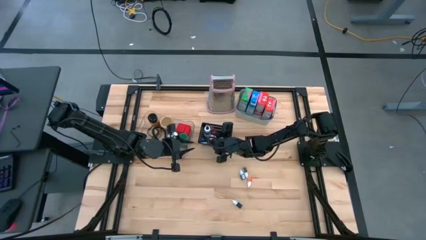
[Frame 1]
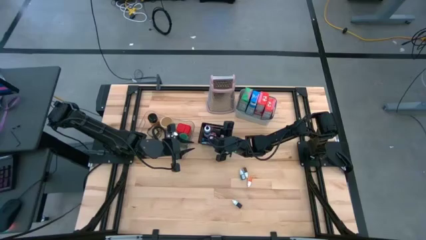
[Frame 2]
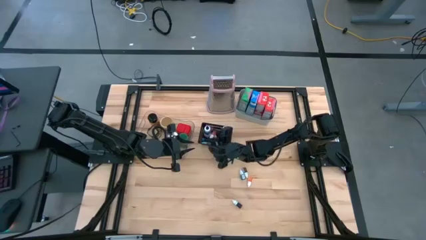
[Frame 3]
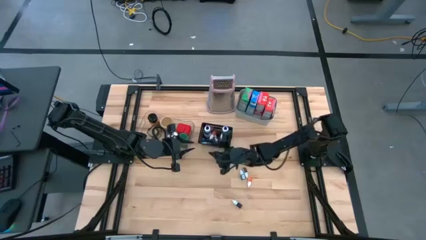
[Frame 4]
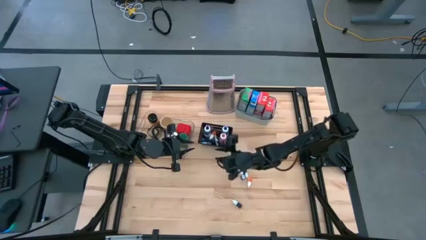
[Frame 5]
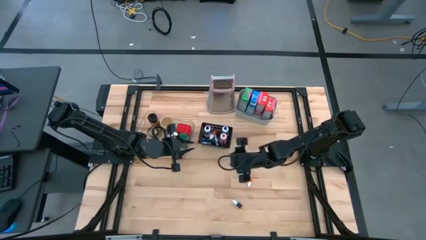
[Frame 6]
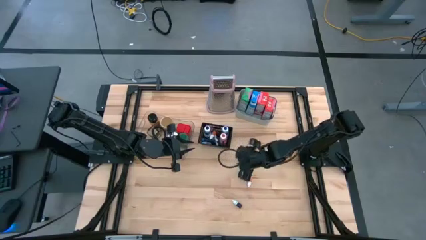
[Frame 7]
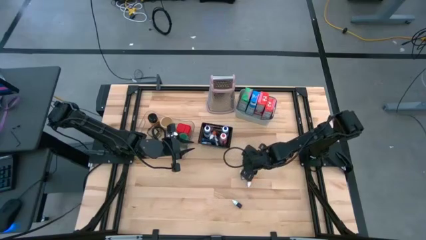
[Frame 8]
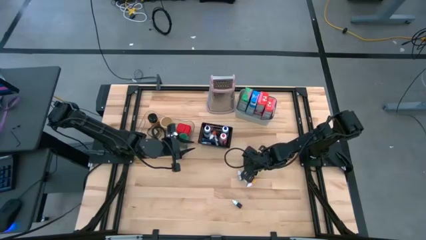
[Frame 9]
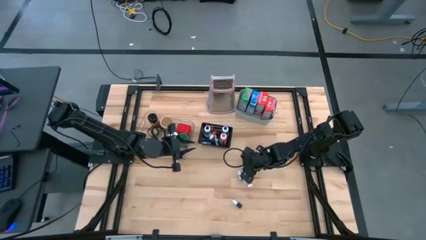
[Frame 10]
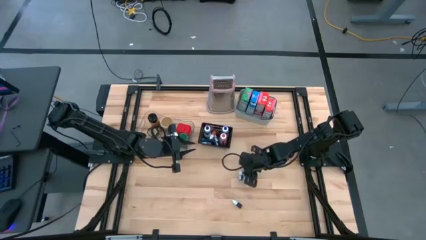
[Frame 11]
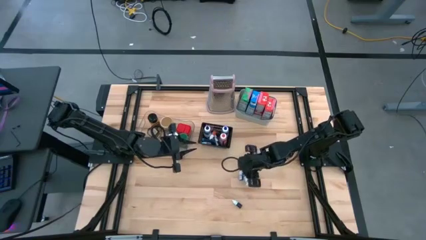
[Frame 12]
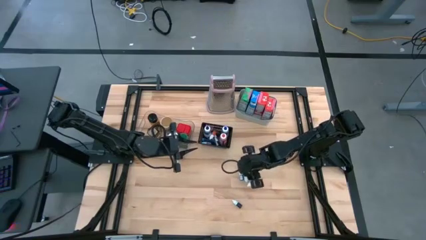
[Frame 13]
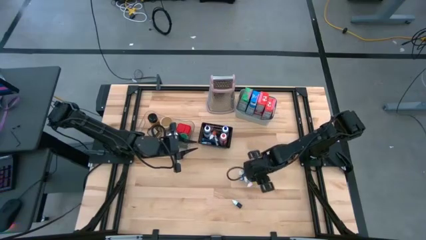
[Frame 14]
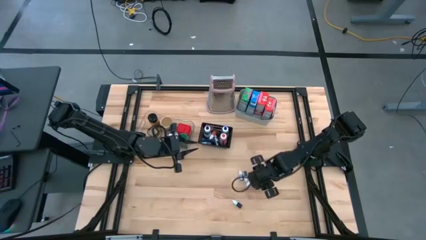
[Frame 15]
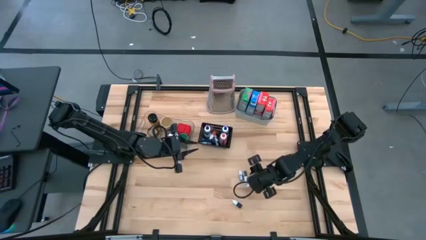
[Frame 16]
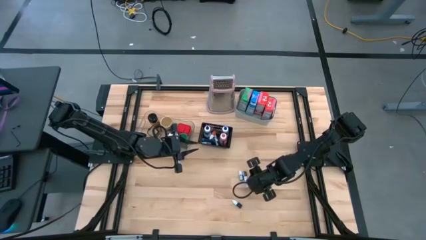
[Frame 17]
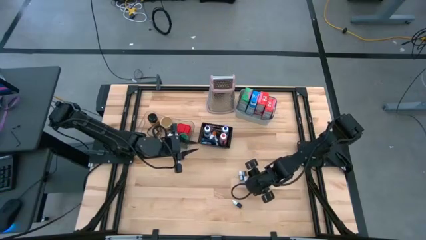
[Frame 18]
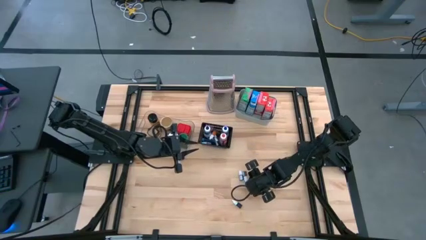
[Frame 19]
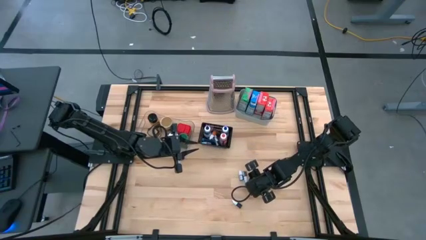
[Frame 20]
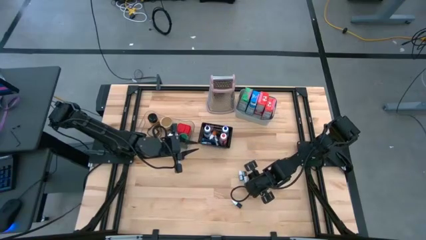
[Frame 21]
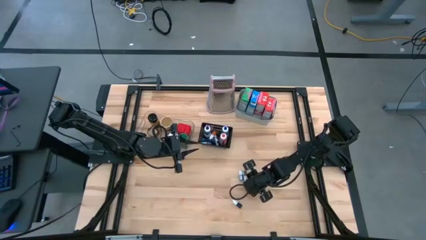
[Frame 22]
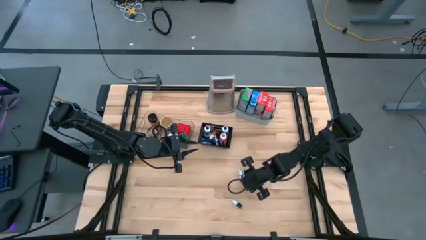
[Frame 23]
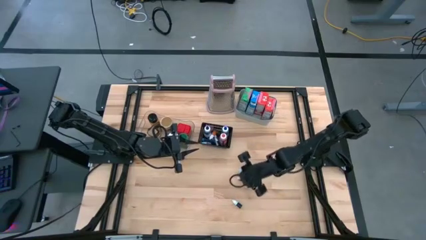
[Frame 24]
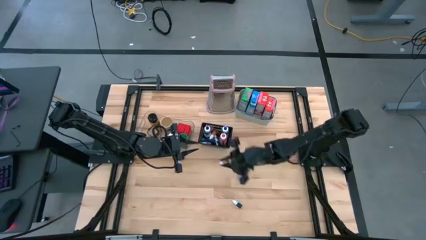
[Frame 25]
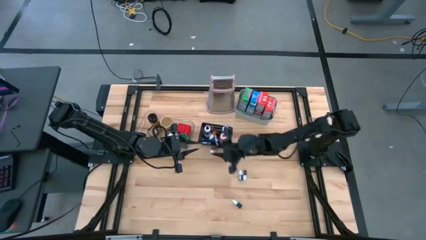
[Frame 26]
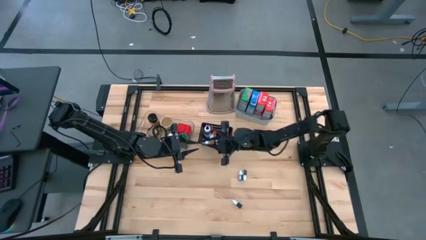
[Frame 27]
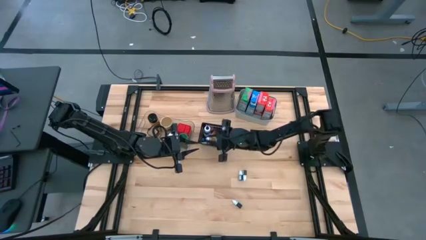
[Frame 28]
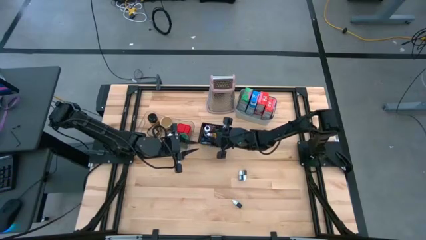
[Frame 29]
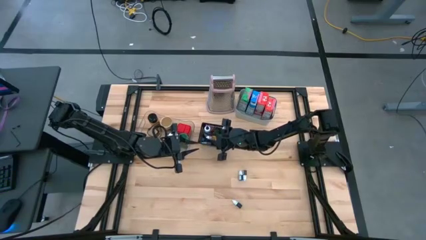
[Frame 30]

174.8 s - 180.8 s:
Task: Pick & Place Kitchen Items
Put the small yellow food coloring bottle into the black bin

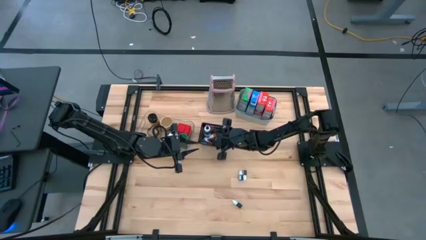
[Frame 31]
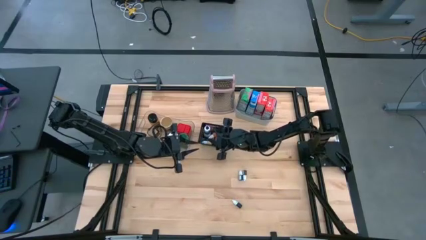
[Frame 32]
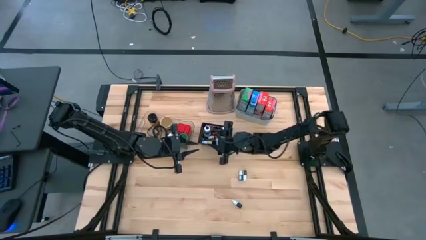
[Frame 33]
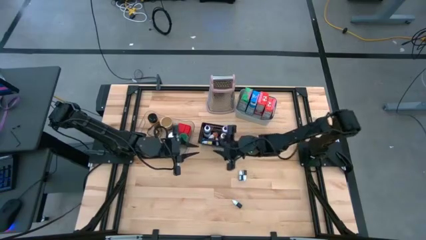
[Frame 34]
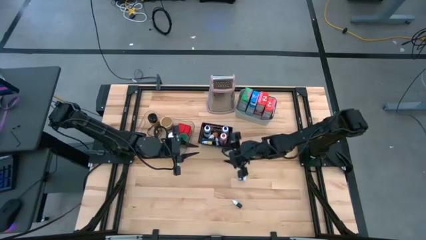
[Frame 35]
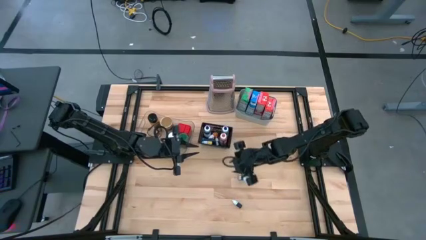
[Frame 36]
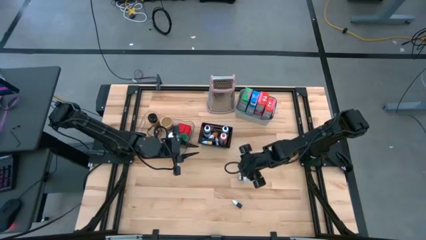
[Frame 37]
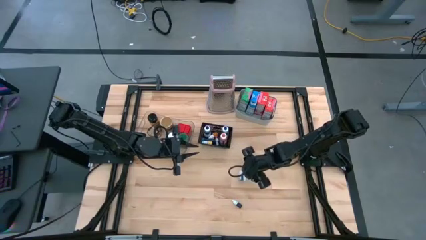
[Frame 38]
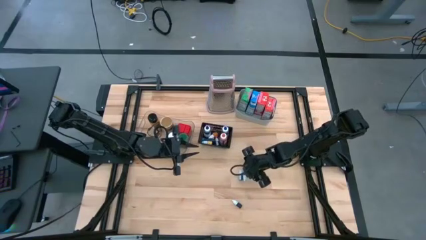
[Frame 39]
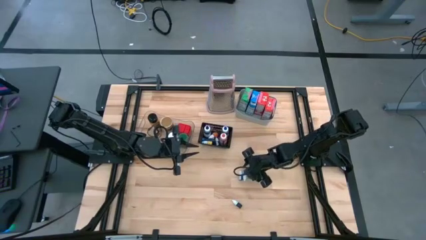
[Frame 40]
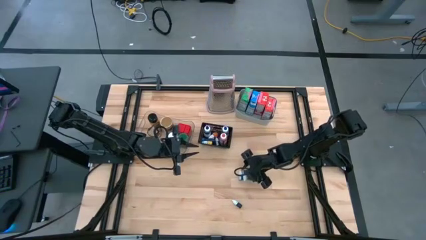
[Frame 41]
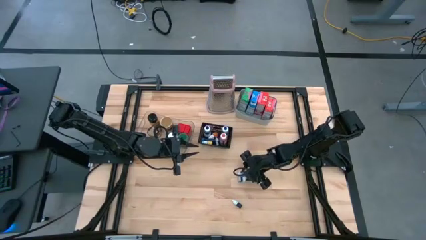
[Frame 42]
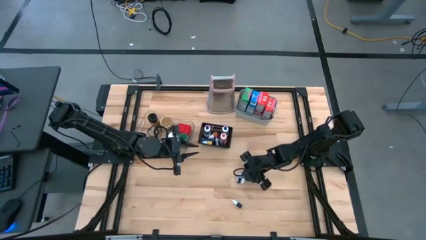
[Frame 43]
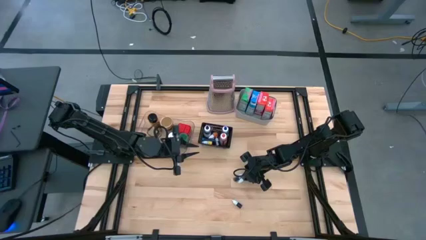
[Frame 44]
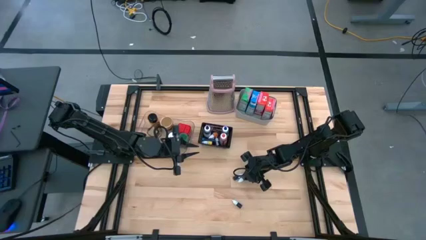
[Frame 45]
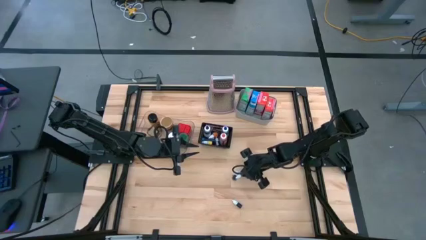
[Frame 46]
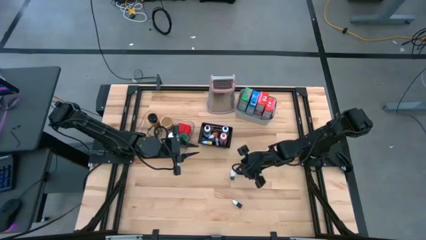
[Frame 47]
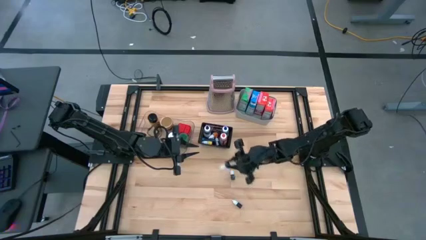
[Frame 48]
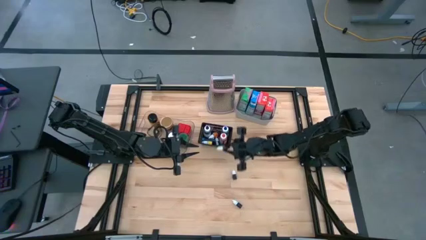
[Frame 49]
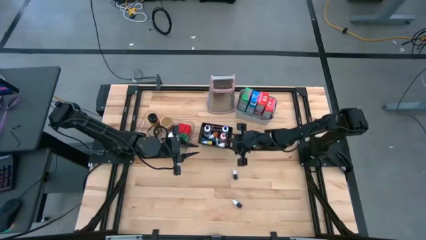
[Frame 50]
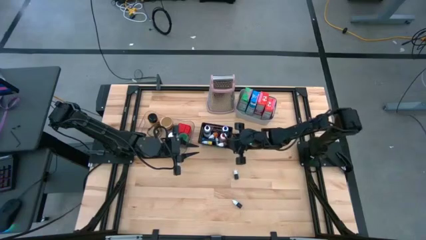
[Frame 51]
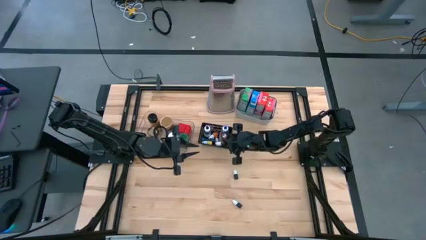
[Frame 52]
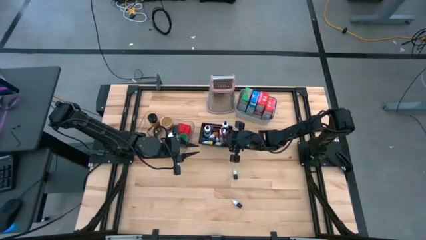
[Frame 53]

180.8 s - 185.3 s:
Put the small brown food coloring bottle into the black bin

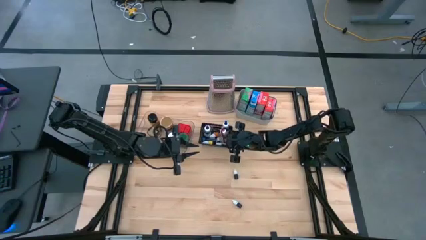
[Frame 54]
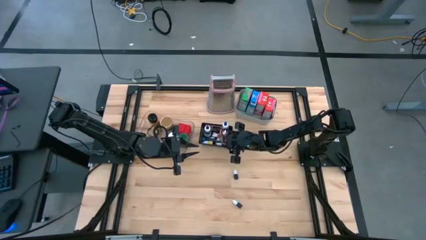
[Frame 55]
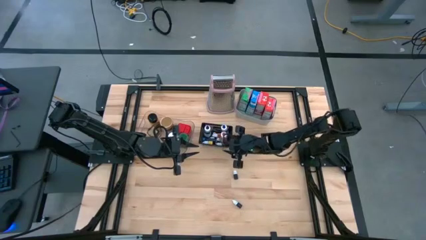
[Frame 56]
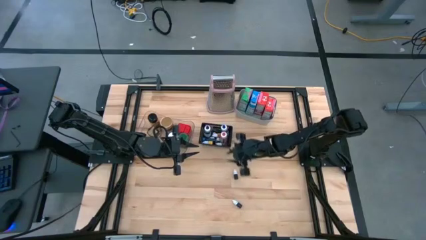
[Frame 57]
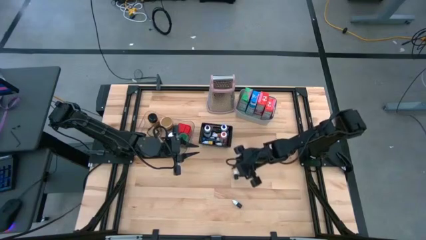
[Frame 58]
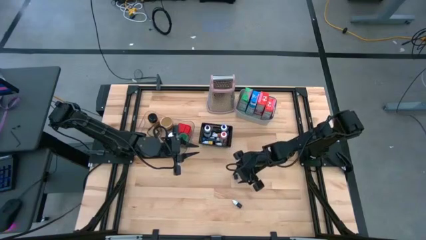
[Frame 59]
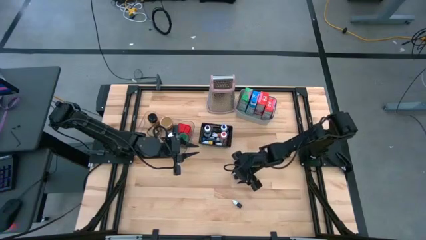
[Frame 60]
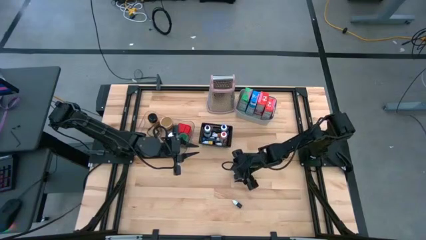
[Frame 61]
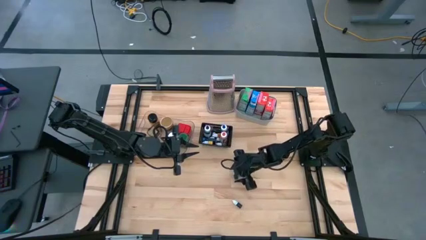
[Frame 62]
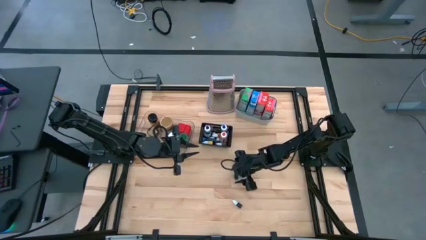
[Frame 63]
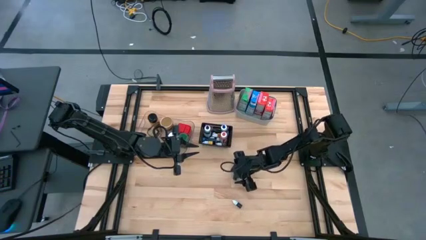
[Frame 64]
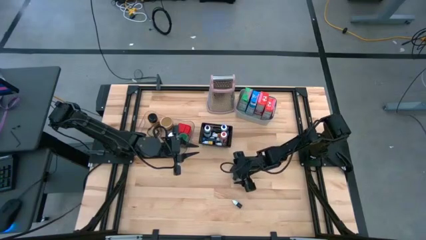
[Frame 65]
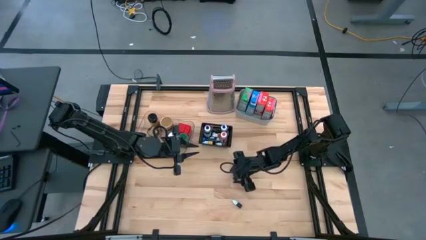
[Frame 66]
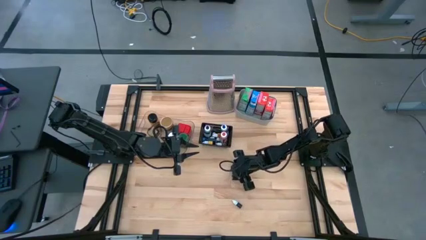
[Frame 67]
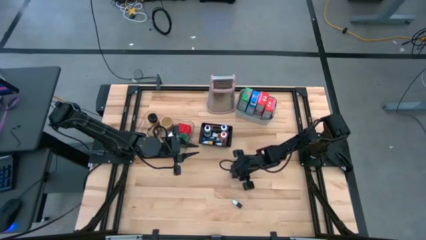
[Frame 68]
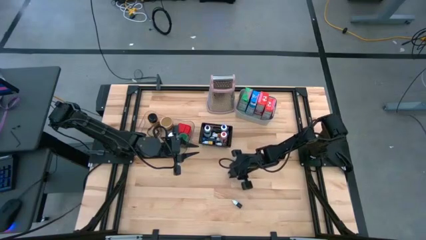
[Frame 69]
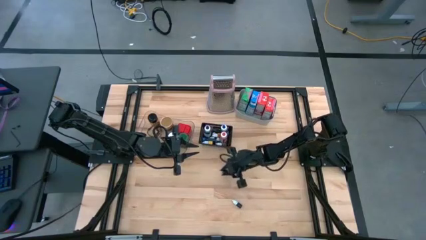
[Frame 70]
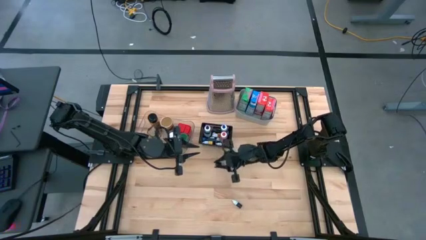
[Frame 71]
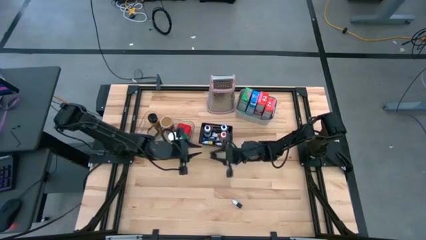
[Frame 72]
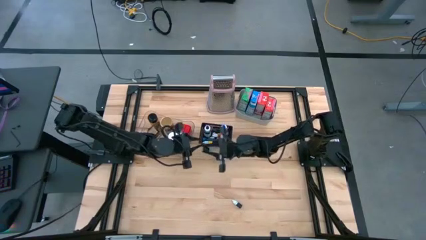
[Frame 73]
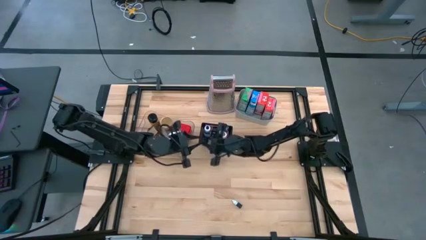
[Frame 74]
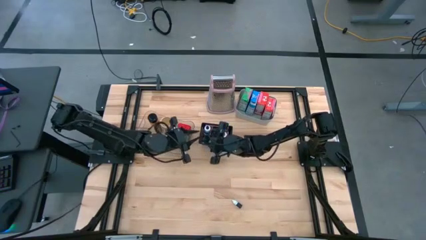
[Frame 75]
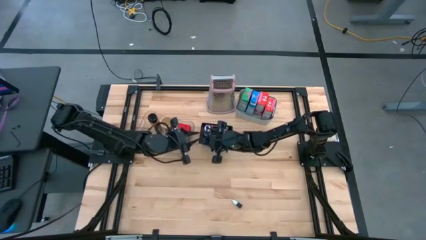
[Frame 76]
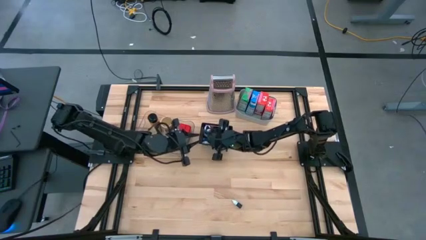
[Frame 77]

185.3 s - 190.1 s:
Put the small green food coloring bottle into the black bin

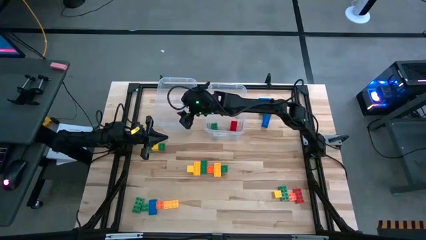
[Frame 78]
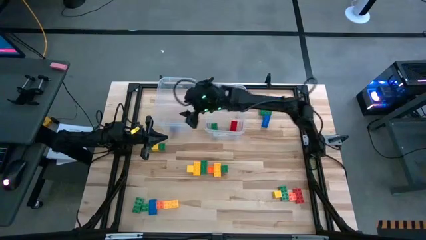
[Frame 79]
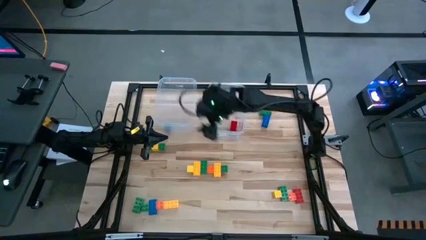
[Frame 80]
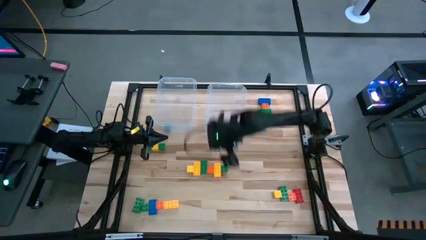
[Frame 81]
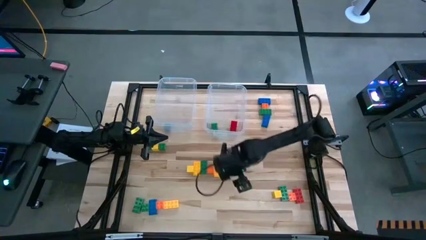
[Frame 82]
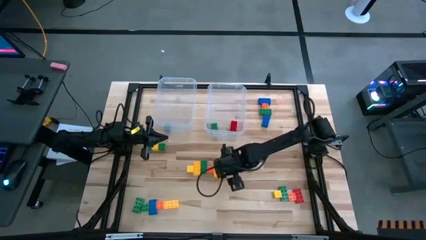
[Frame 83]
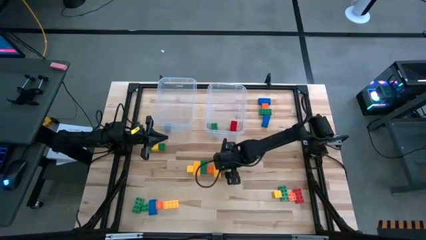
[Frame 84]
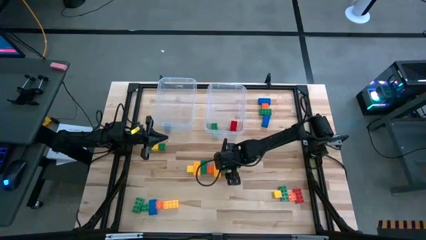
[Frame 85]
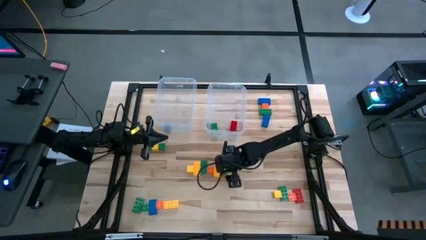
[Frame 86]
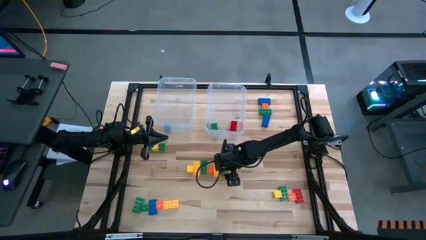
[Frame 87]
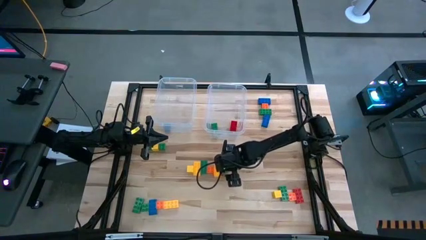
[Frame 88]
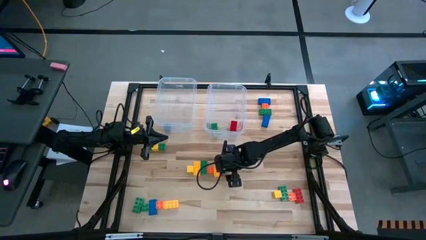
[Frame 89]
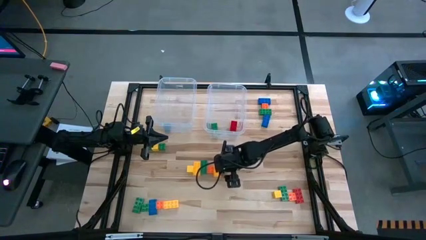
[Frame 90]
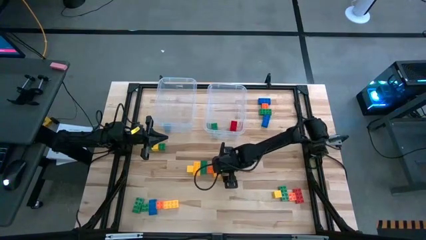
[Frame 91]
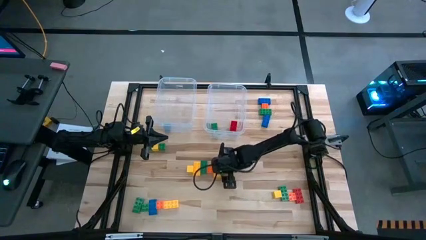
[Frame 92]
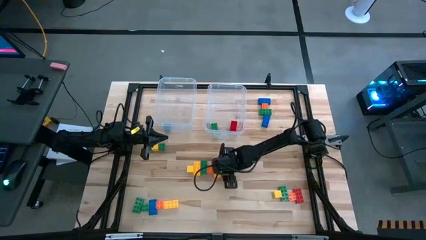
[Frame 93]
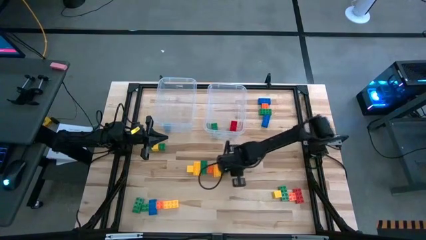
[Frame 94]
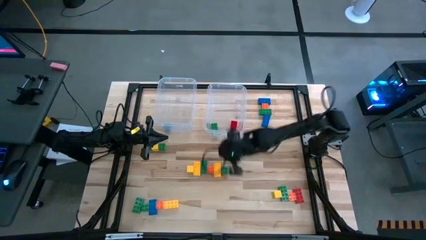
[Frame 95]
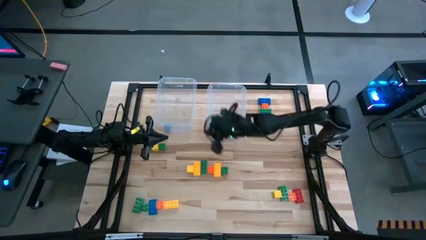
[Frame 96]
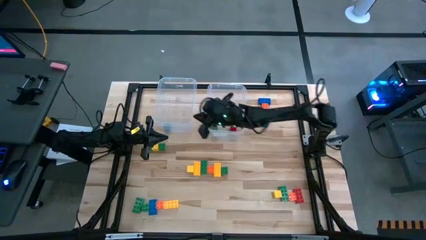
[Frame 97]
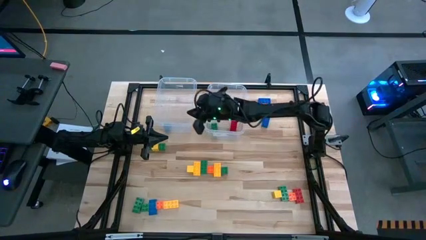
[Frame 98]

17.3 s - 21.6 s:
Task: Sort blocks by size
Put the green small game piece into the left transparent bin
